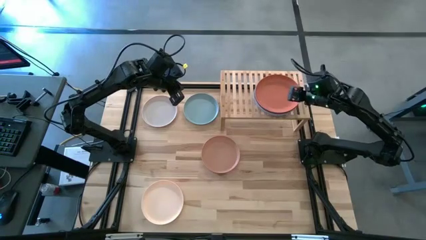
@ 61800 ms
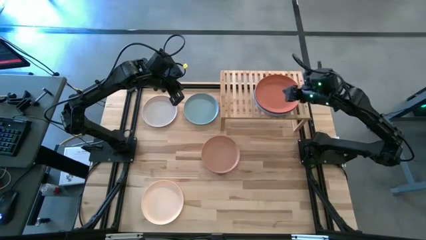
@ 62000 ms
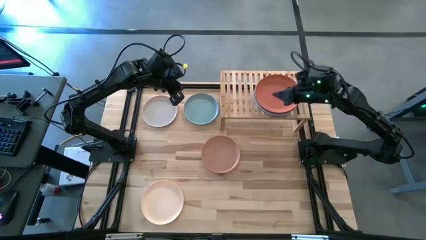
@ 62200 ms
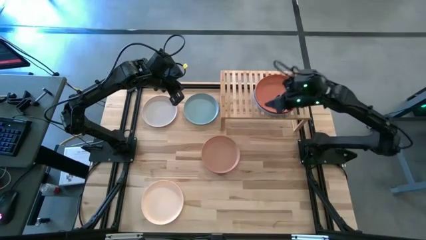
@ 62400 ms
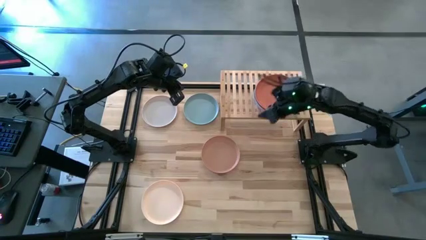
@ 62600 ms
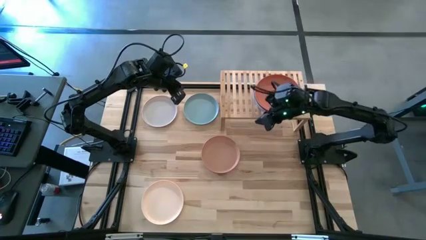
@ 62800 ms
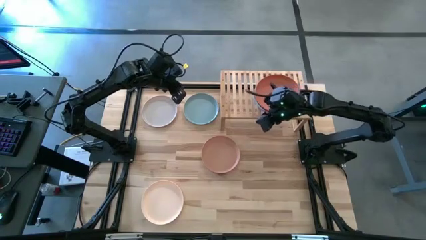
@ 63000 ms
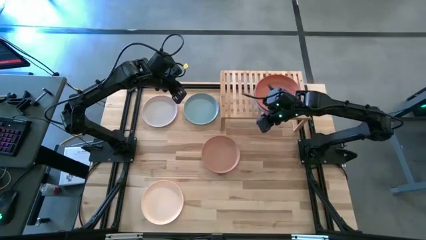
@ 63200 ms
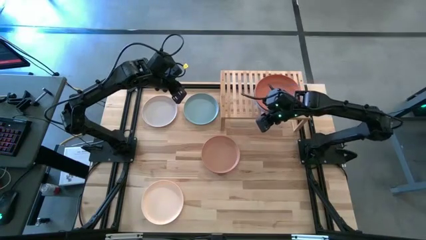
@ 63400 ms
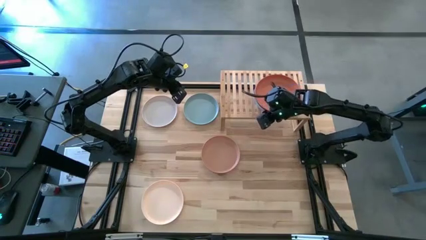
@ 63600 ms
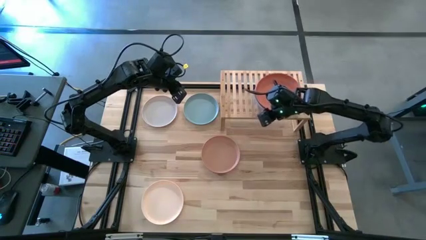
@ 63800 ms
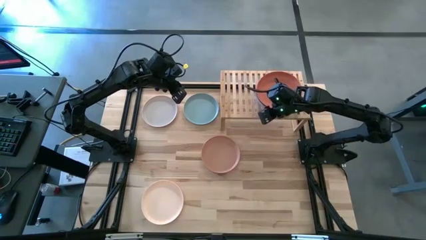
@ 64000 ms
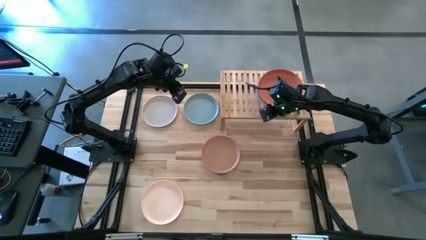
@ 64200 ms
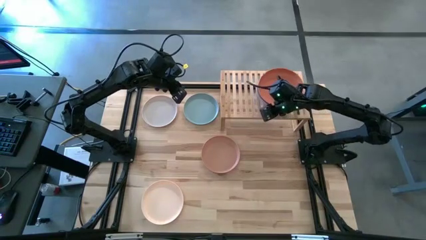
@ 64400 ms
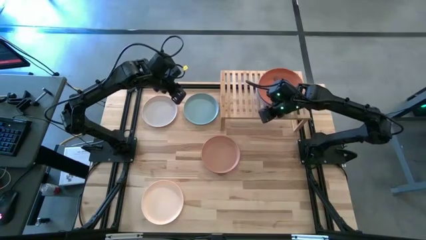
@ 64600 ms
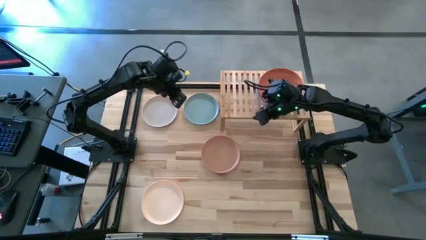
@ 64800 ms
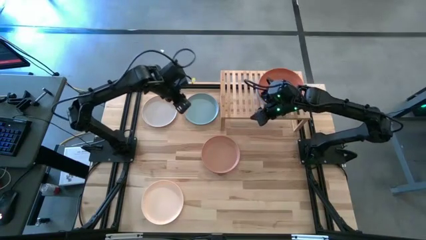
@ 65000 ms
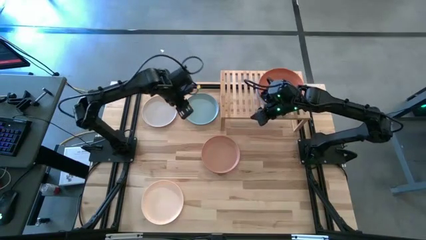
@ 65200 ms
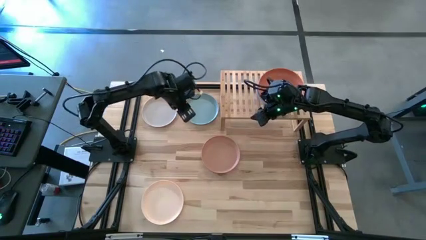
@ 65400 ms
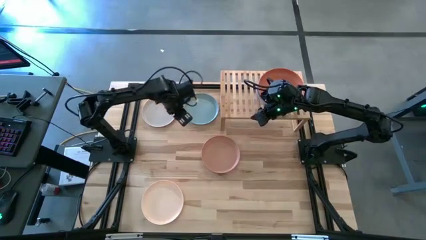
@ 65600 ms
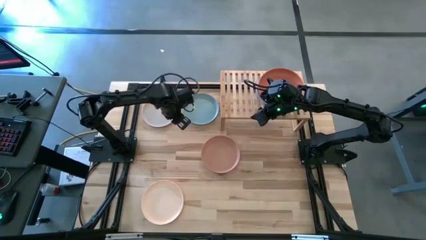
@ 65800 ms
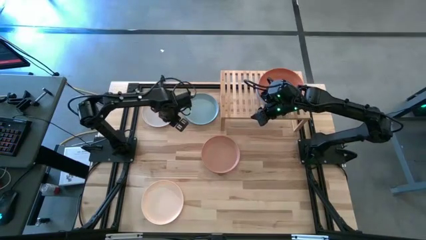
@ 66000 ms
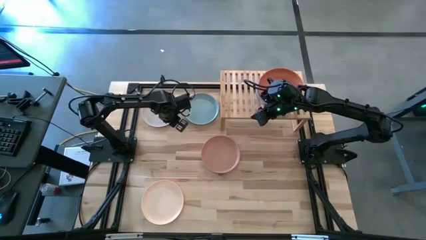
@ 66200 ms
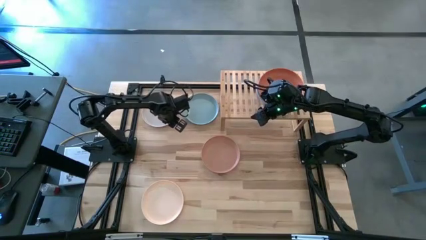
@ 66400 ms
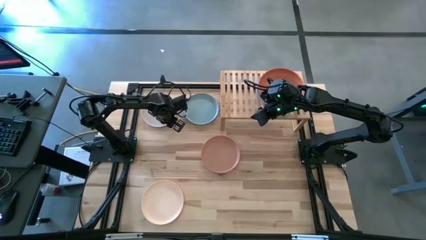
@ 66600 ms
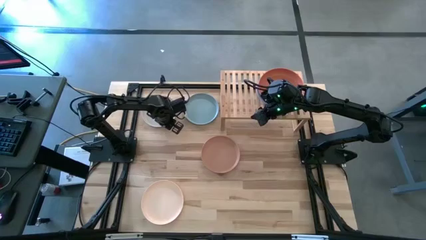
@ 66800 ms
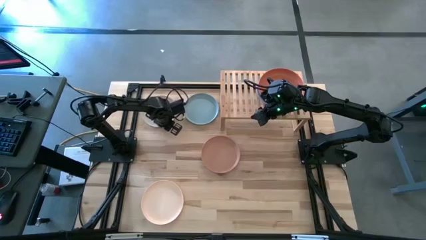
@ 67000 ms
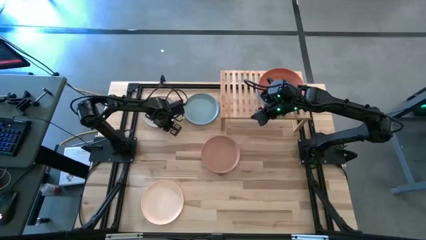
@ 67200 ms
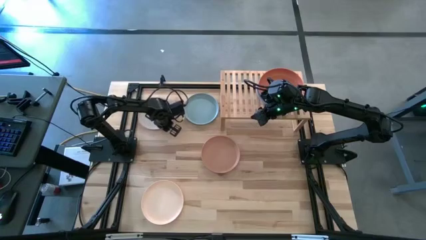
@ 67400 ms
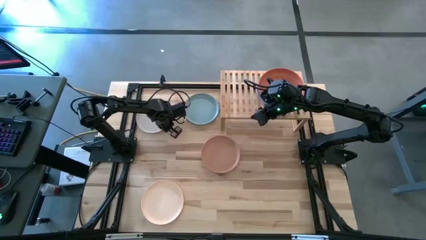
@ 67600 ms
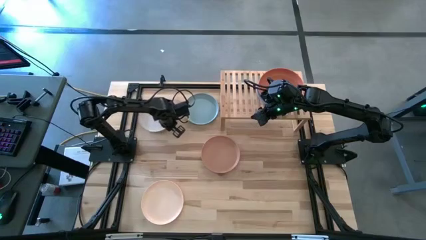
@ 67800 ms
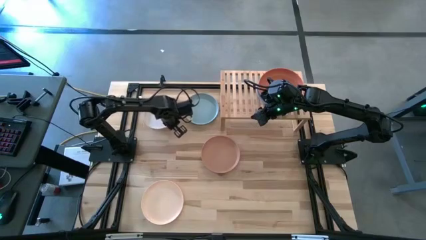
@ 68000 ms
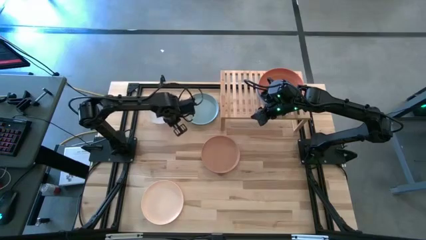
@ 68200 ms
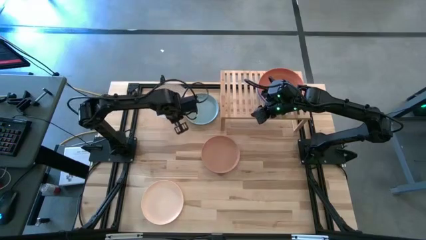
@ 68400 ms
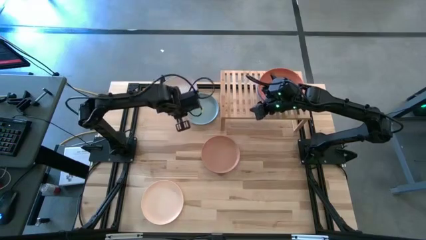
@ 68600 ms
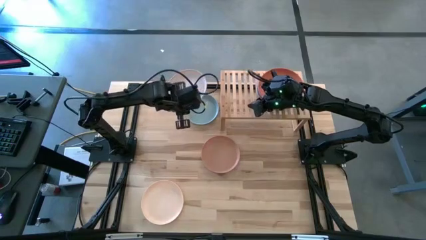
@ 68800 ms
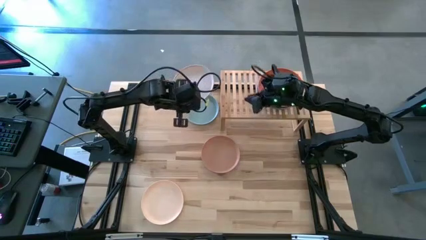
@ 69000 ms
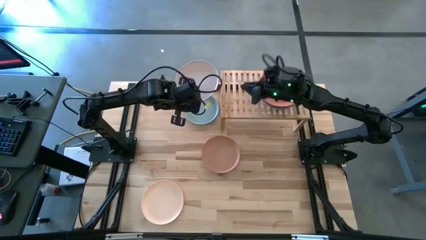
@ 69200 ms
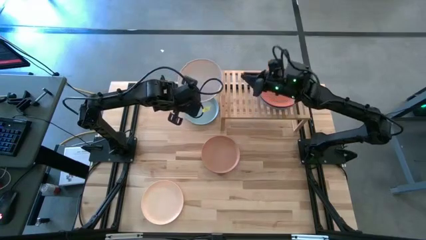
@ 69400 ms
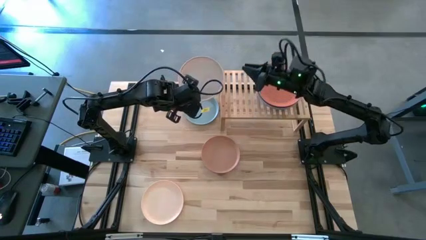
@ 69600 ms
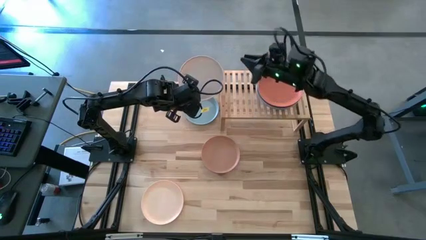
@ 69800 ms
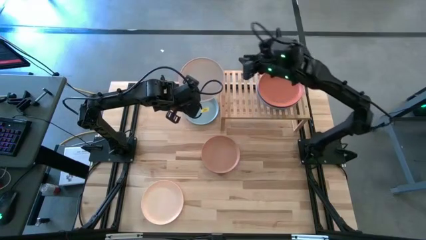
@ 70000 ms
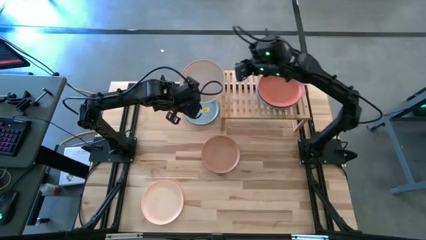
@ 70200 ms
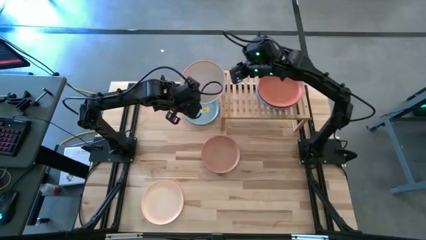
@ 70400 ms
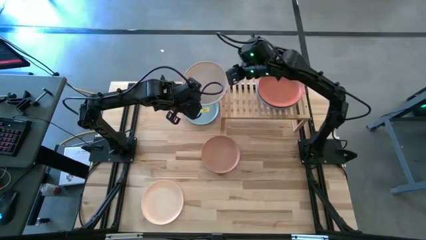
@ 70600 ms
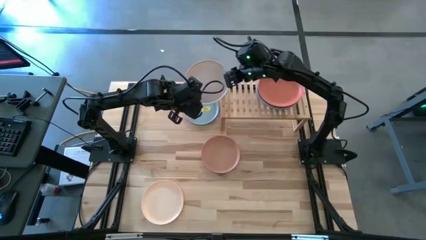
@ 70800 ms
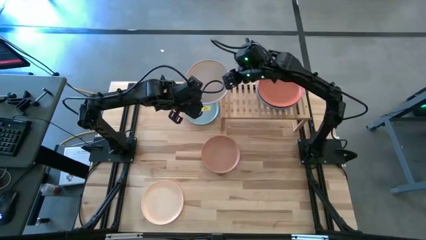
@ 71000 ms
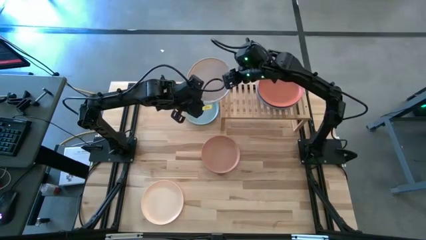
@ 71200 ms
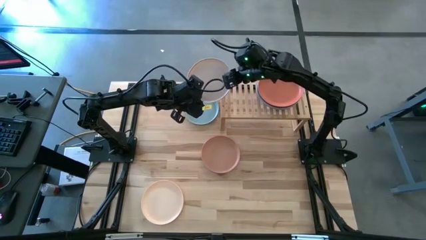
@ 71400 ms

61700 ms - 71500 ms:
Task: Place and stack plates onto a shelf
Put the white plate on the shelf

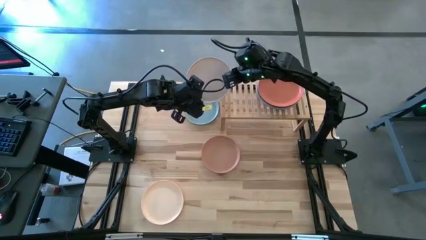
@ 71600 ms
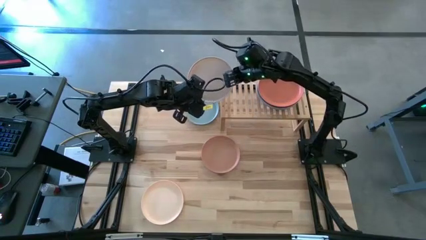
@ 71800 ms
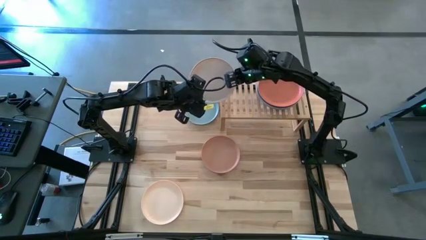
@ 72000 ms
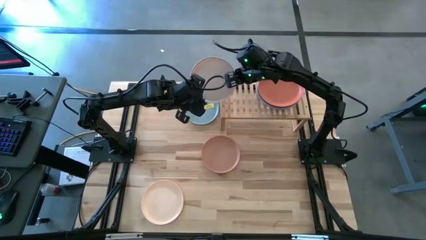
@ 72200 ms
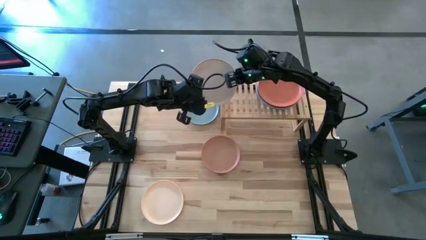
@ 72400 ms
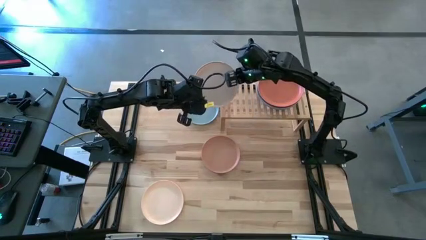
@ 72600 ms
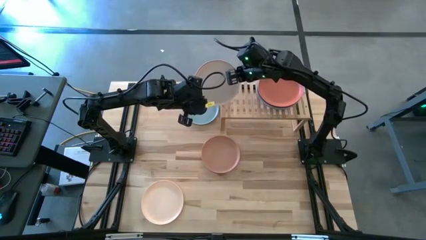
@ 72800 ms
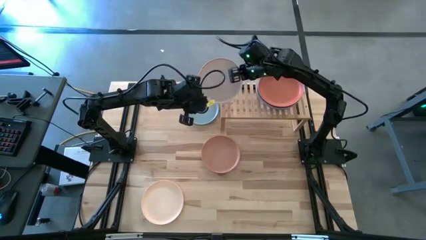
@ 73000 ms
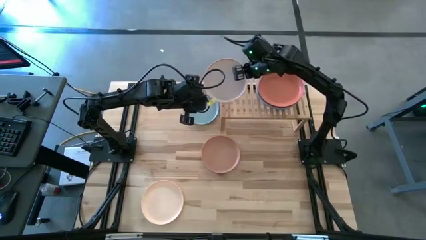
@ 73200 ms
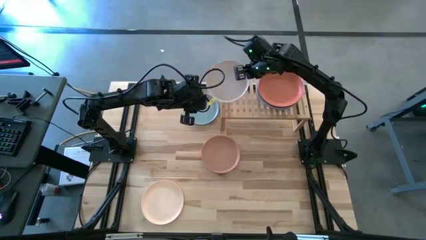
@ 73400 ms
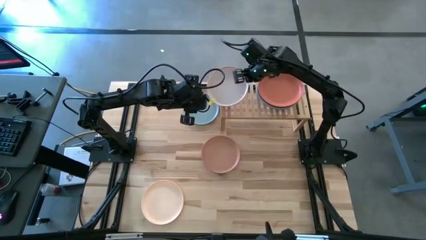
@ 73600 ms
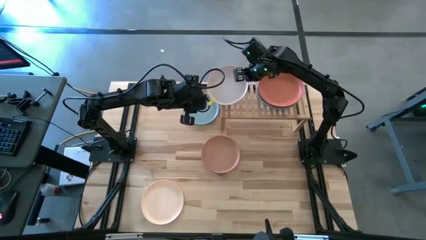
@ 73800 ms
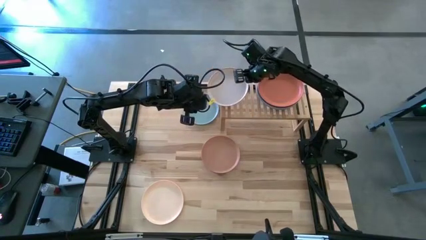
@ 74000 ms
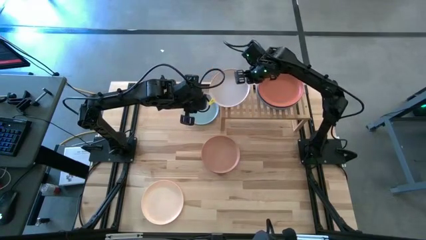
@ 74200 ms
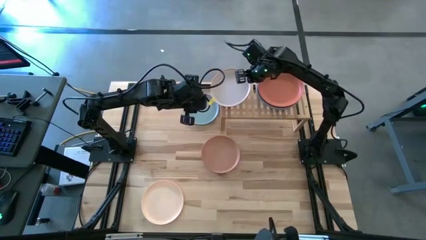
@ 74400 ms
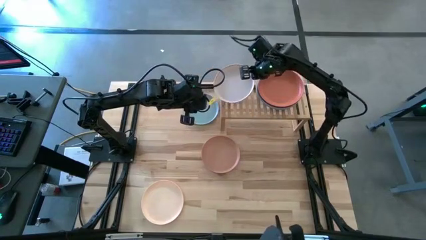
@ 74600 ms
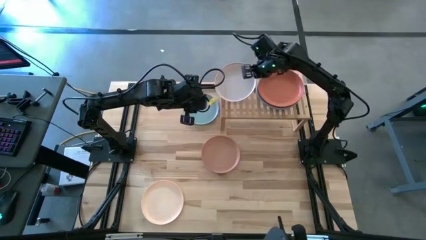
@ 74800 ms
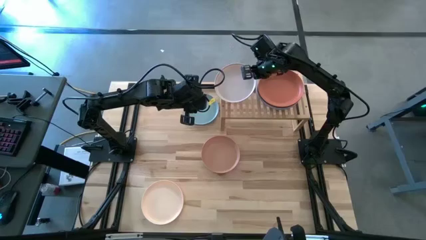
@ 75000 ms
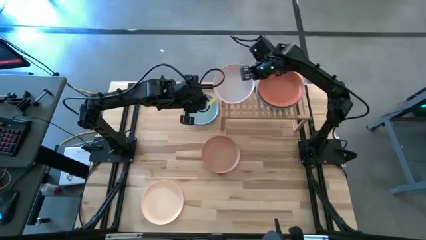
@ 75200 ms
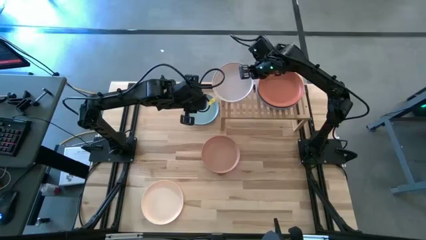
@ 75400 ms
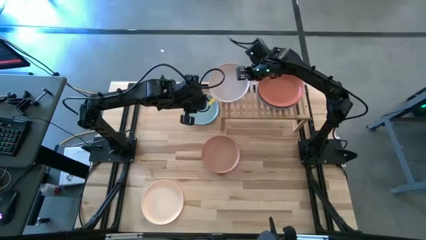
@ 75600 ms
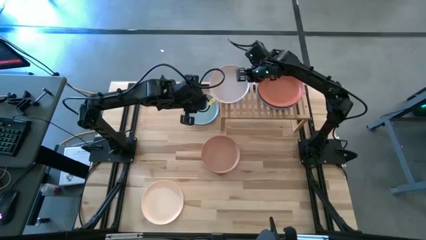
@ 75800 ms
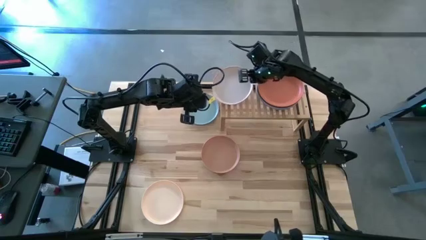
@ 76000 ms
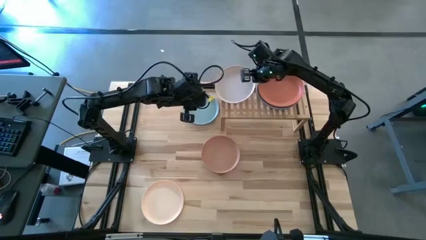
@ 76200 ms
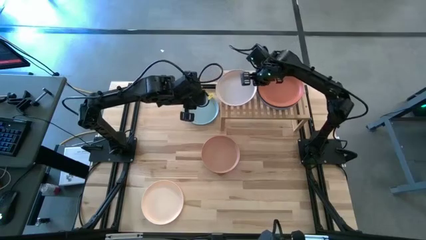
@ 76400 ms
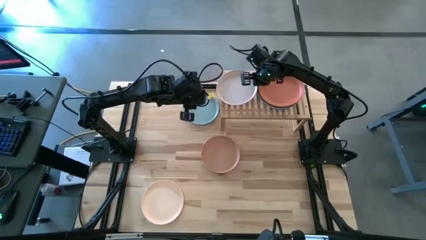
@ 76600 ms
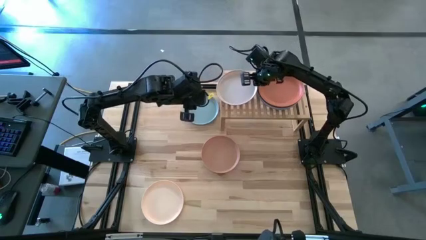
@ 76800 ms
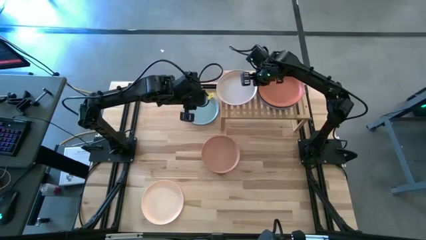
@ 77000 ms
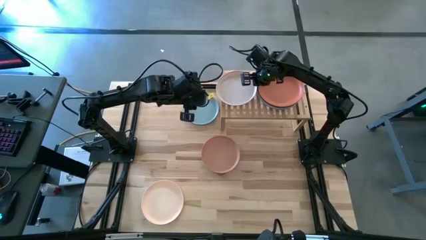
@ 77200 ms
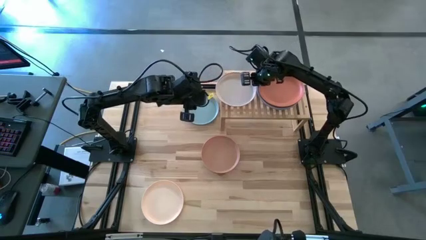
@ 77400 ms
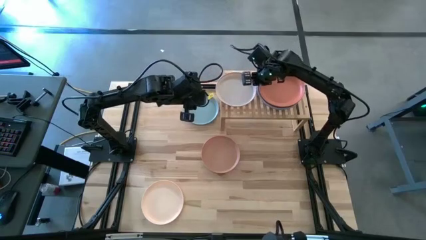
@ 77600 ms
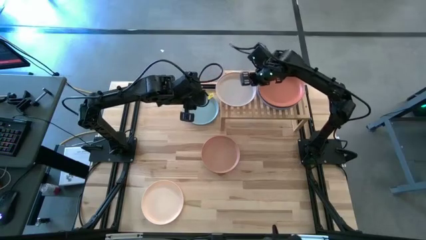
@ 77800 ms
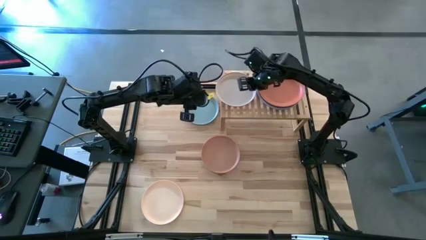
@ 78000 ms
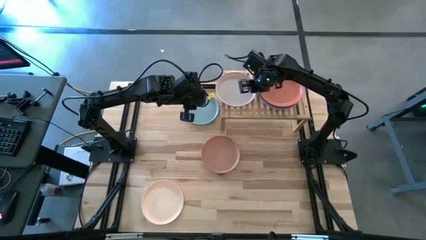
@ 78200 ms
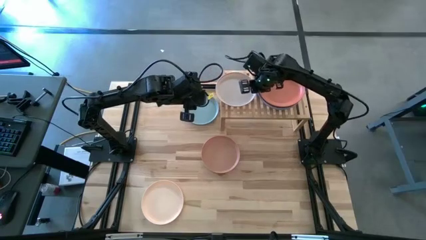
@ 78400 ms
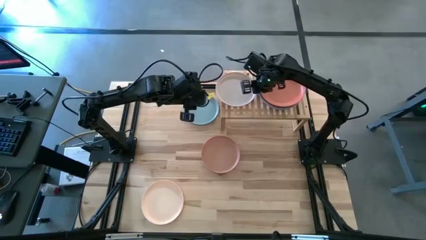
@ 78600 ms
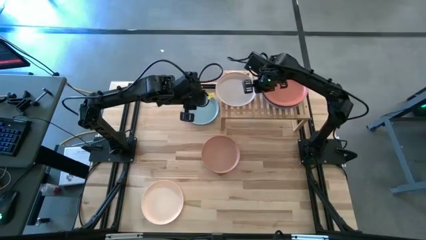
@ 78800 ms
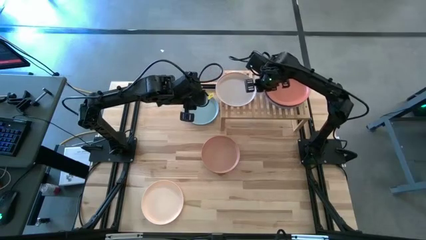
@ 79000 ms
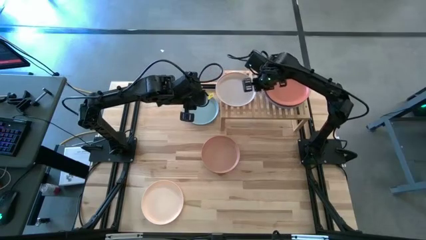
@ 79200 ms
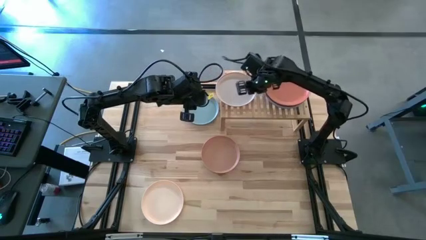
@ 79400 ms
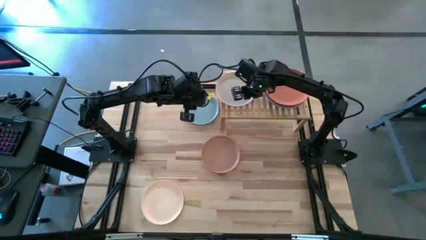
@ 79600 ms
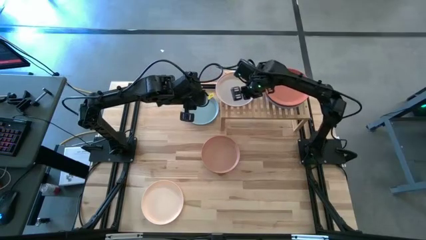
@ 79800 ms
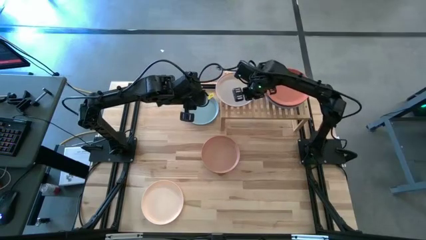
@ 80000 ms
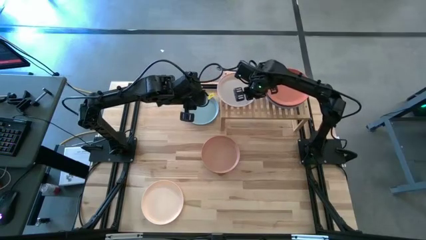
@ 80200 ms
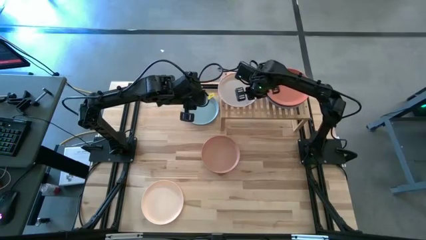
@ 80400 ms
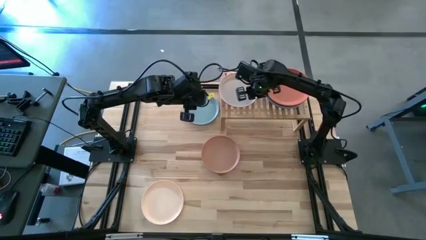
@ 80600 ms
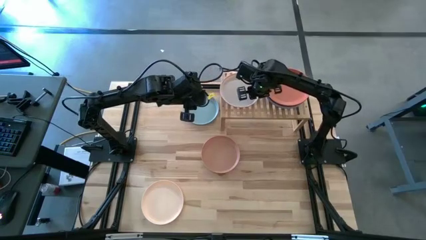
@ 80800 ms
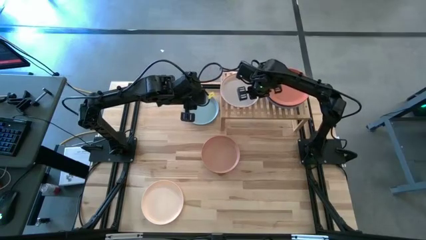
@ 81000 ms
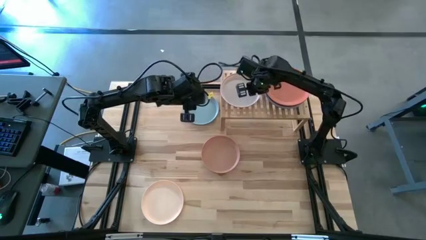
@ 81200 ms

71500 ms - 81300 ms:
Put the white plate on the shelf
